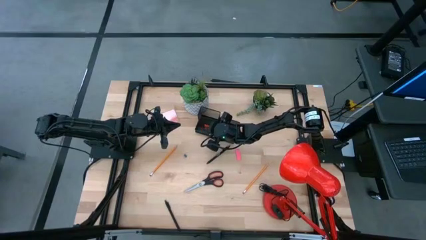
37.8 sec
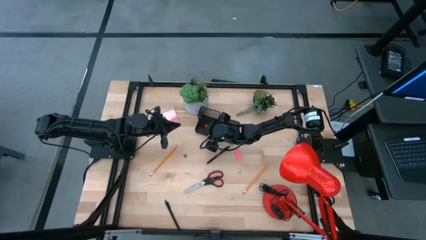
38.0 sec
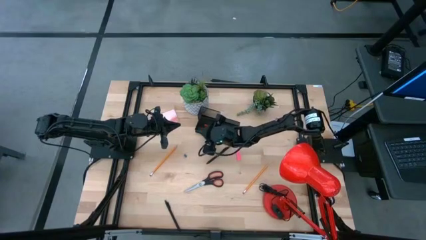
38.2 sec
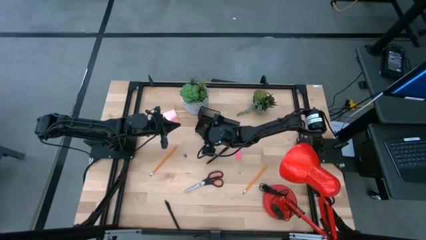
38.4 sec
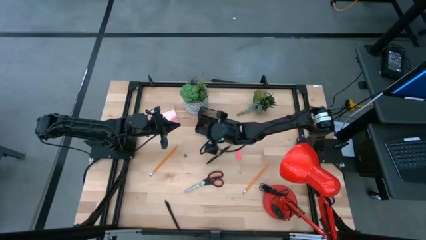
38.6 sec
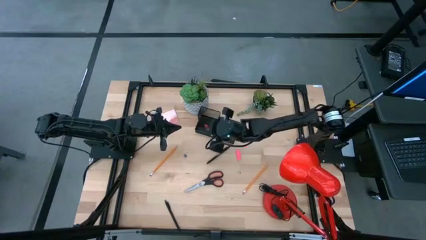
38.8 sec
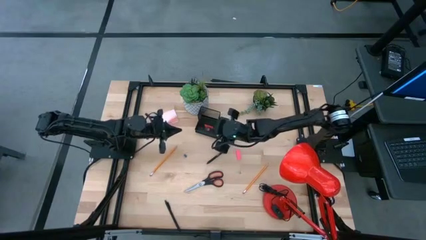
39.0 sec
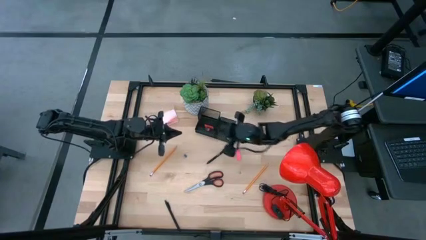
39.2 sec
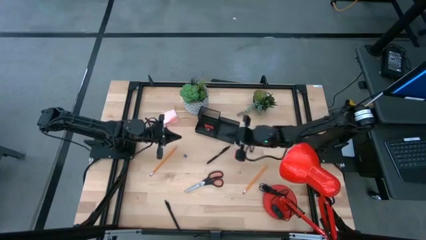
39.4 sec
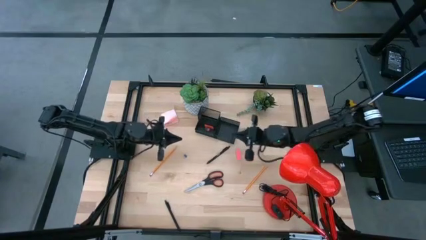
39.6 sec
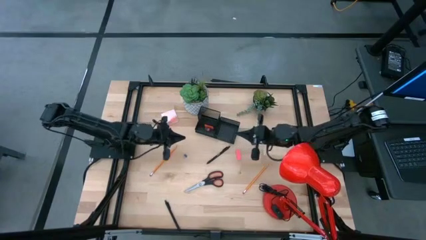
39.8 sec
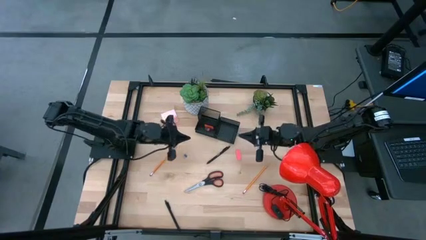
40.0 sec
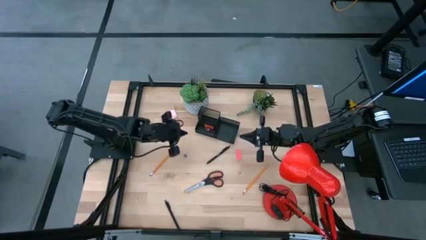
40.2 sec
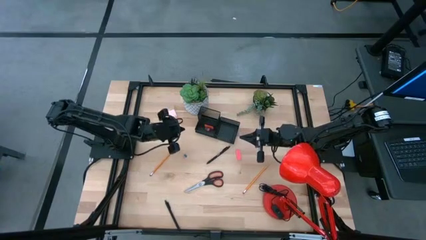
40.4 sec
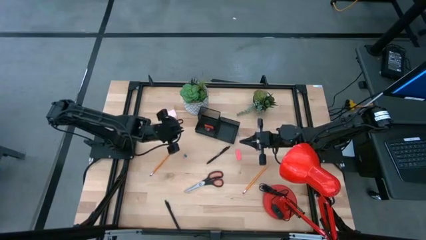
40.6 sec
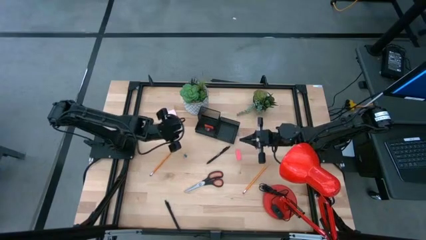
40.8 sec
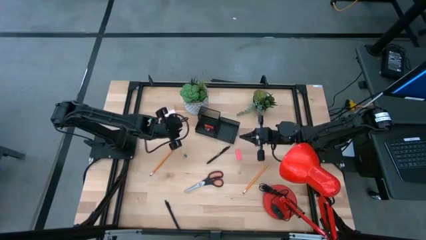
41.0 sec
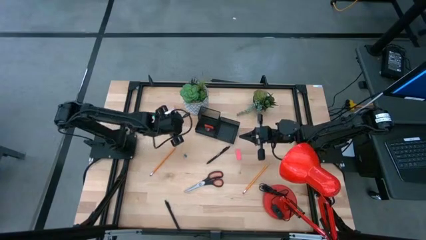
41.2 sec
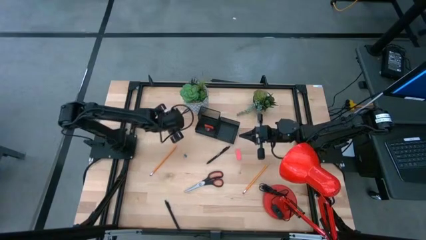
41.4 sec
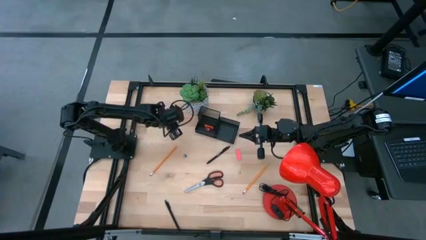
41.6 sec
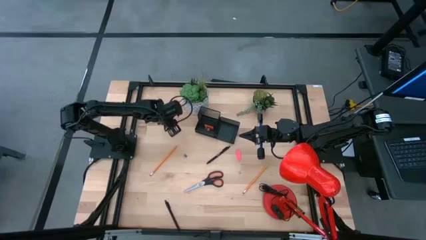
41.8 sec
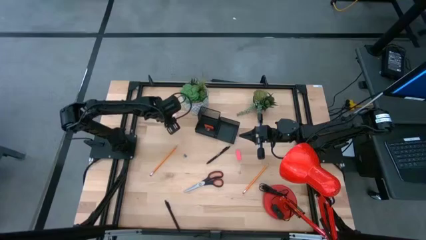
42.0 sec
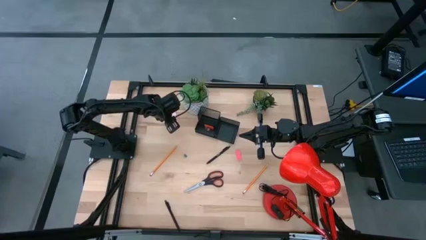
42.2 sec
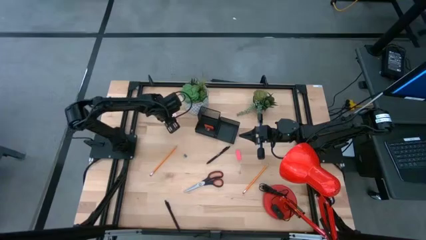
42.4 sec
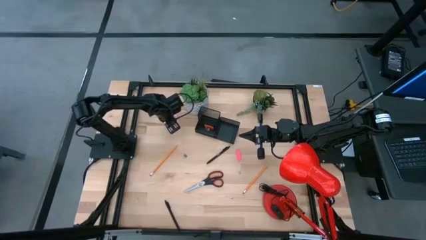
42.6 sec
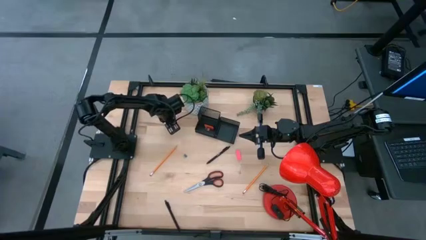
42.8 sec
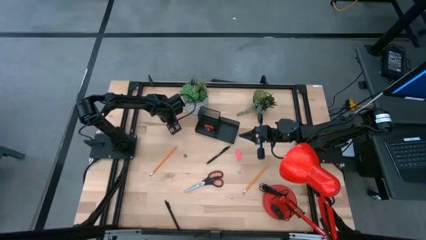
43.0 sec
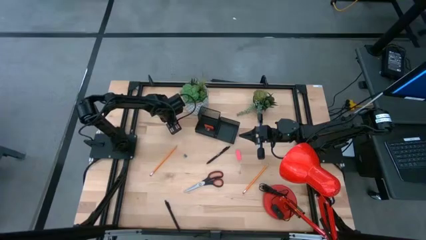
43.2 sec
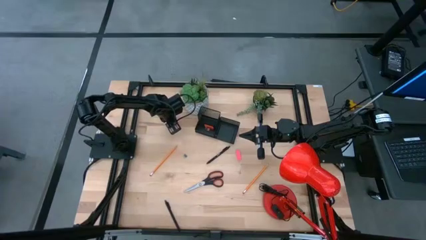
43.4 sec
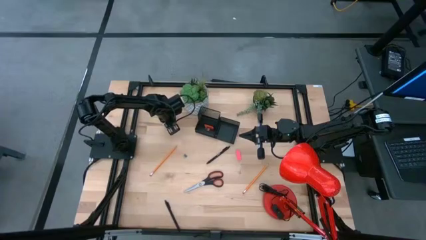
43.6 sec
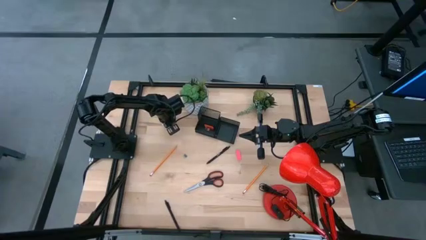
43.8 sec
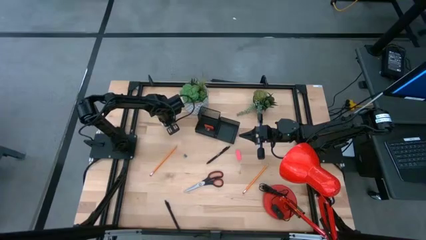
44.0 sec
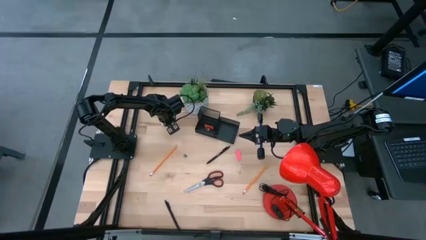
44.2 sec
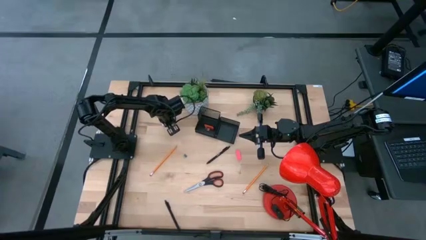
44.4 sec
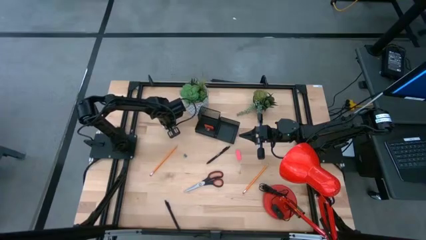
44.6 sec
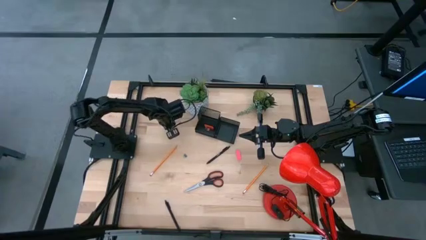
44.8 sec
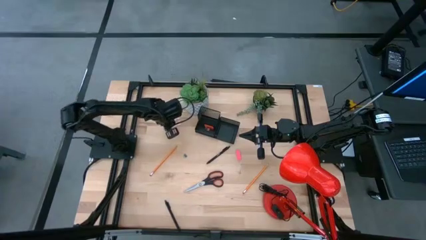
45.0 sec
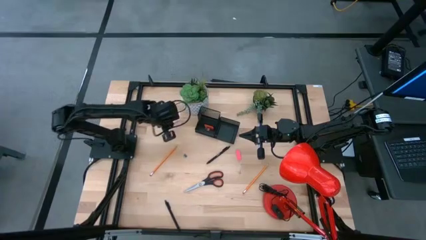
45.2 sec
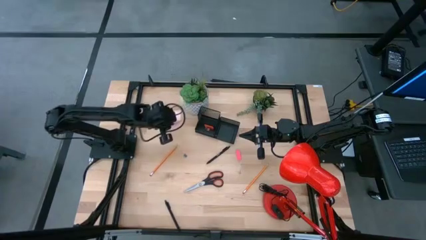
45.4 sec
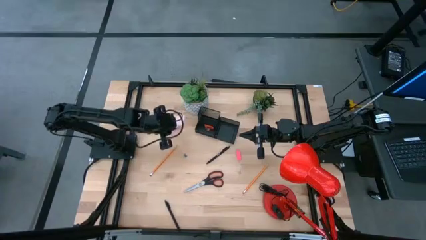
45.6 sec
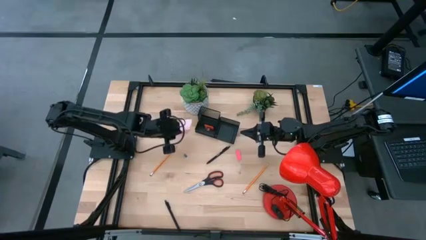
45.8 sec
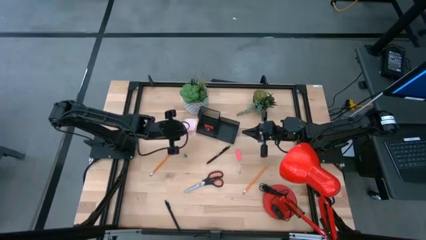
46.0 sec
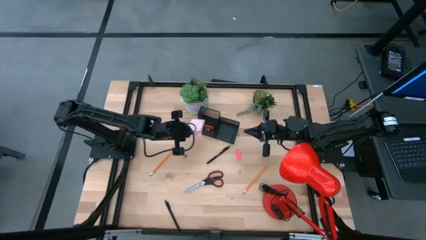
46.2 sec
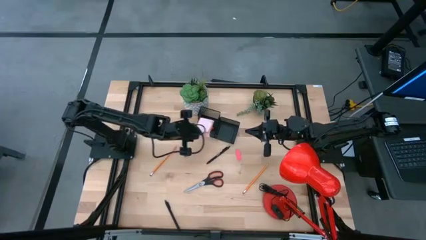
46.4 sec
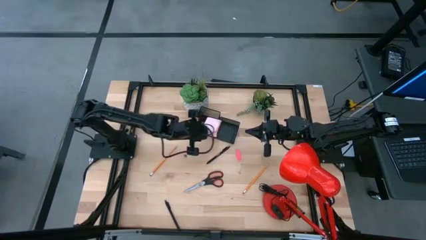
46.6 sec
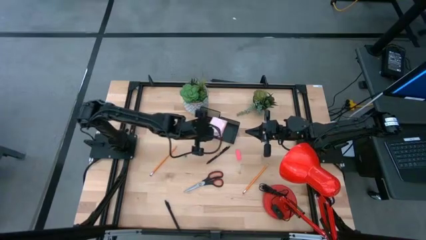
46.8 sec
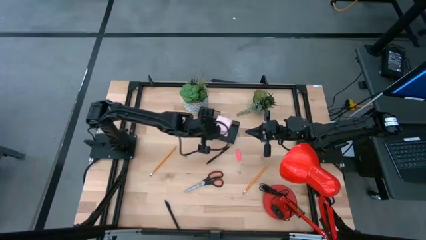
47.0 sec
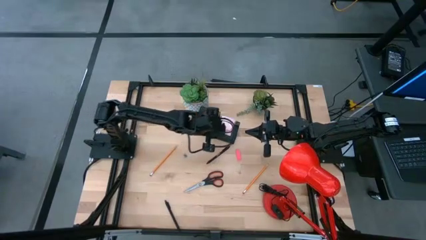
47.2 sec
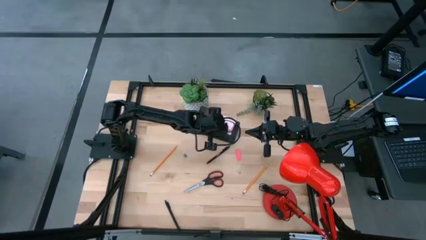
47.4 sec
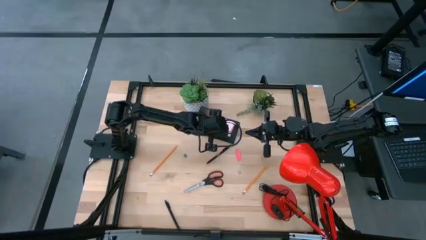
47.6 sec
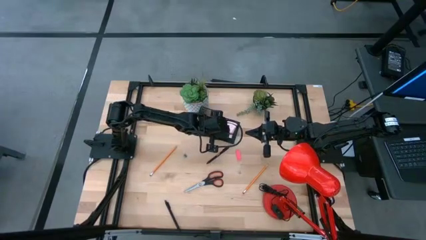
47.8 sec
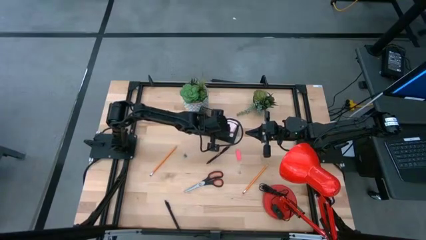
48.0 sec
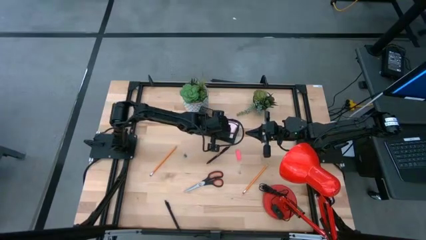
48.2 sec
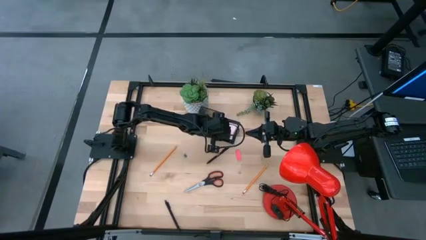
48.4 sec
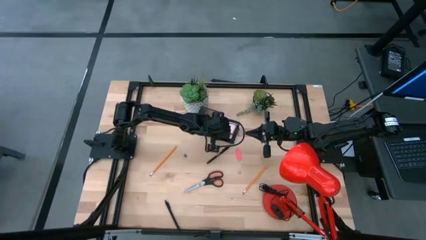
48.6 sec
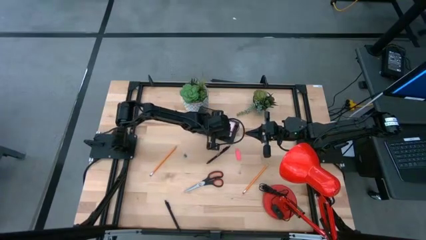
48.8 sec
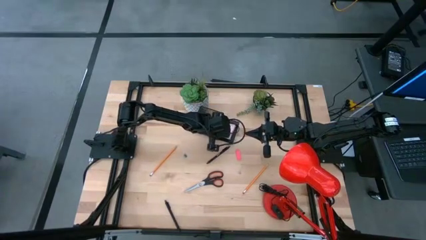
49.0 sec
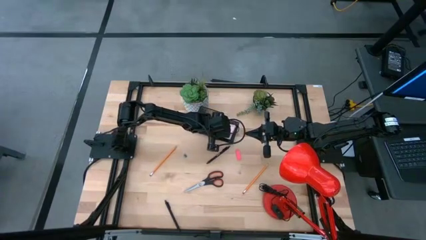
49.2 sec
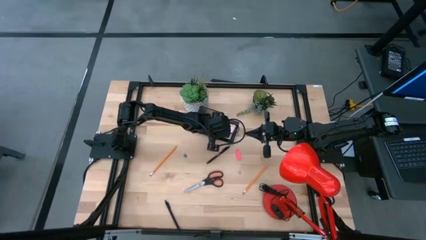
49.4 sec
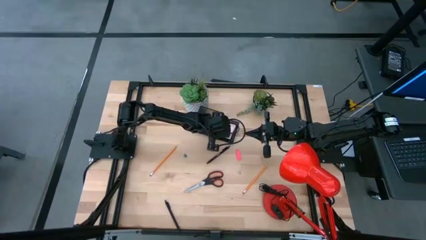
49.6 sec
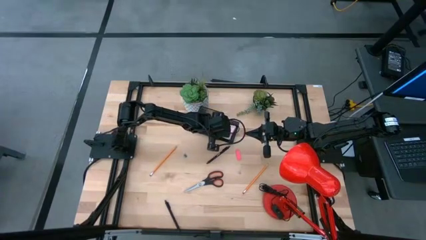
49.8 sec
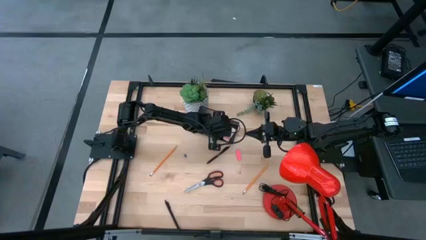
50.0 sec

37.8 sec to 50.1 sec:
Task: Pick and place office supplies into organizer
Put the pink sticky notes into the black desk organizer

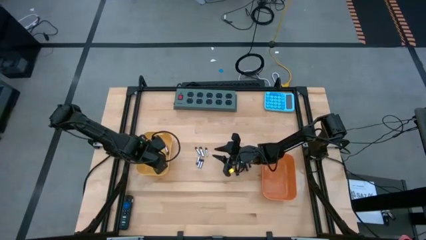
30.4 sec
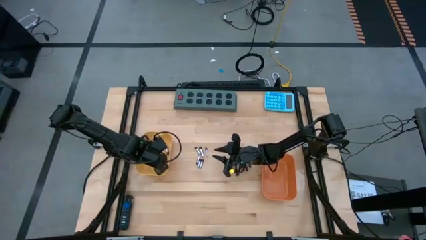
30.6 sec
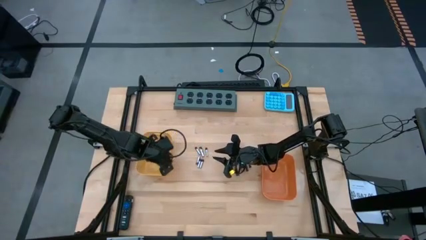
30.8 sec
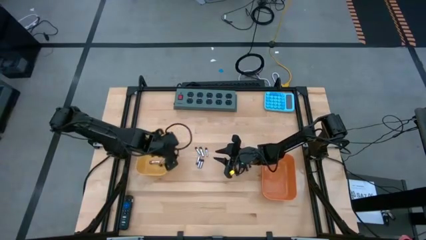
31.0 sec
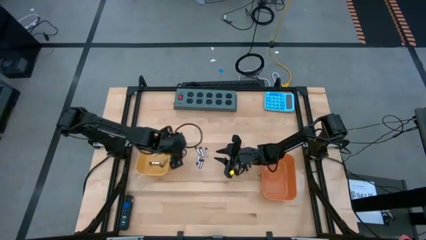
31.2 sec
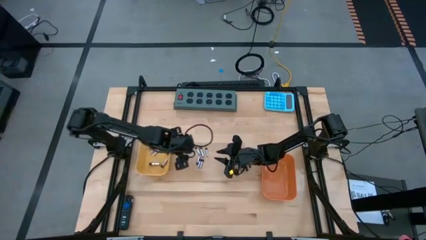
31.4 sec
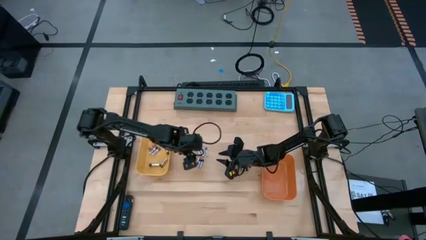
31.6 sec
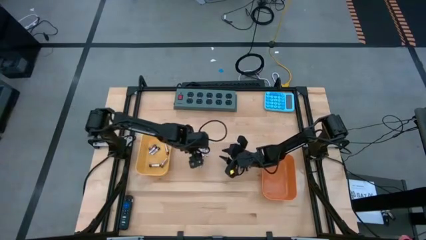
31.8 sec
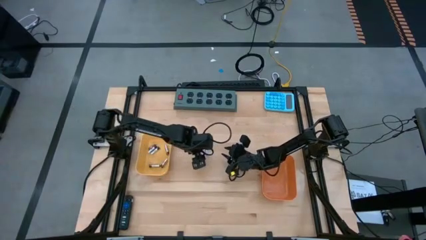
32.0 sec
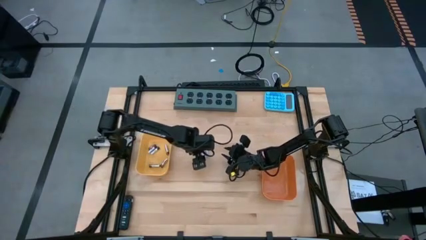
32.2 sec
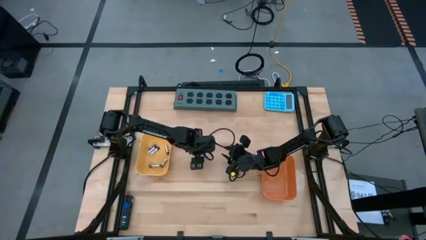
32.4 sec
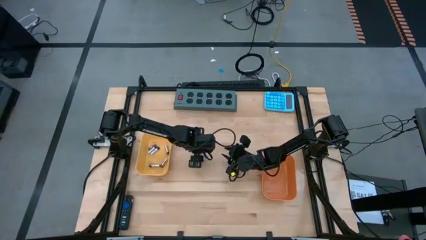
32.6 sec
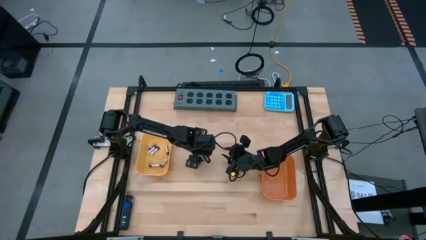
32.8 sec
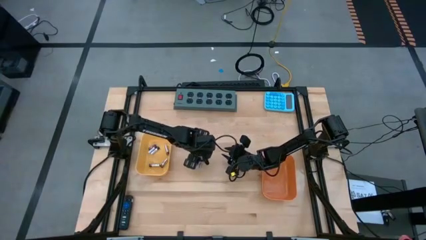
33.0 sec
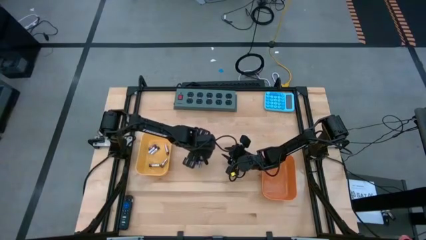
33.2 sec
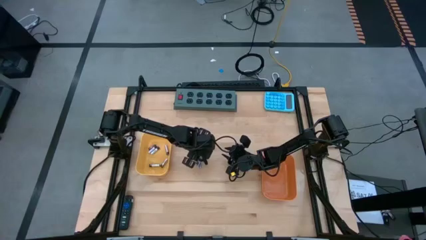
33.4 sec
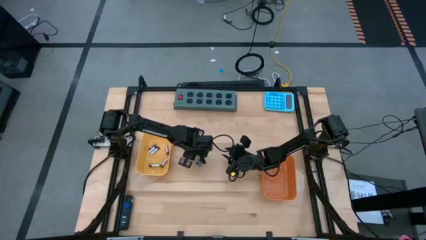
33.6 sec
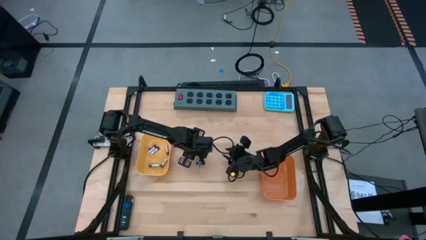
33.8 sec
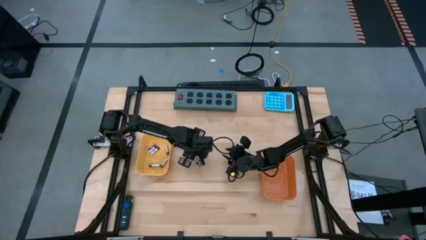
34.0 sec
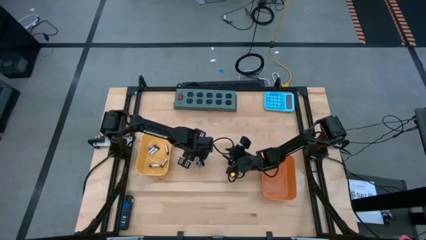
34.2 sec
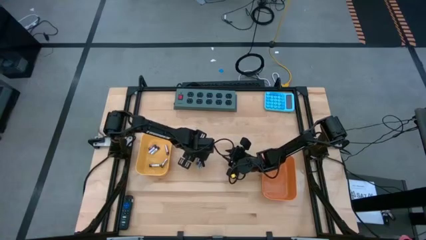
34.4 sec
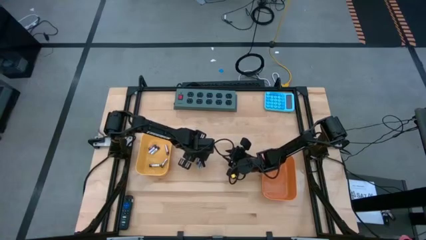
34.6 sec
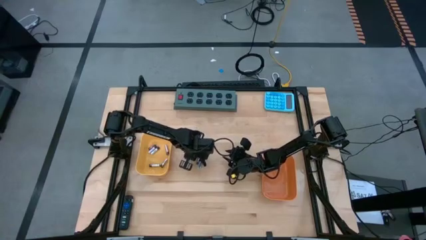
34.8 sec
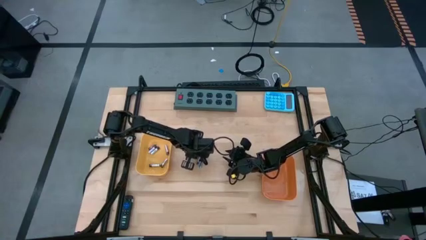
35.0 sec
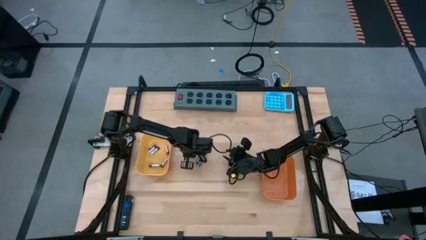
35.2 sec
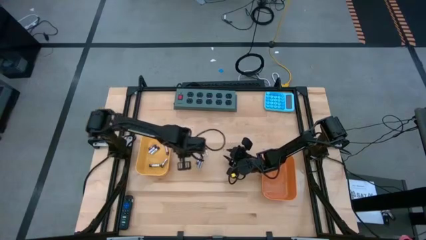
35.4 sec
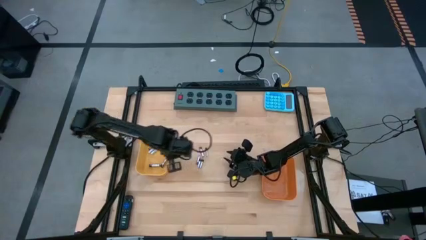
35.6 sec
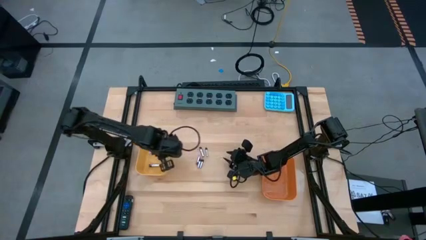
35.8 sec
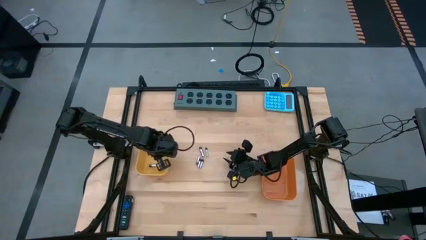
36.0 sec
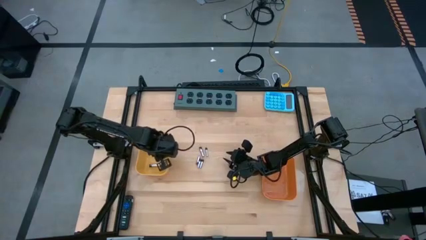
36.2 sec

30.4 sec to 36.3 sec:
Task: Sort batteries
Put the silver battery into the yellow bin
